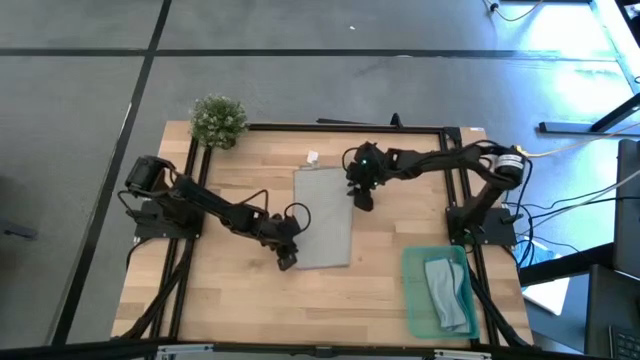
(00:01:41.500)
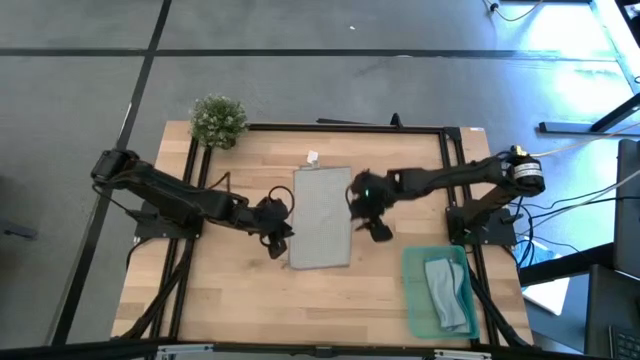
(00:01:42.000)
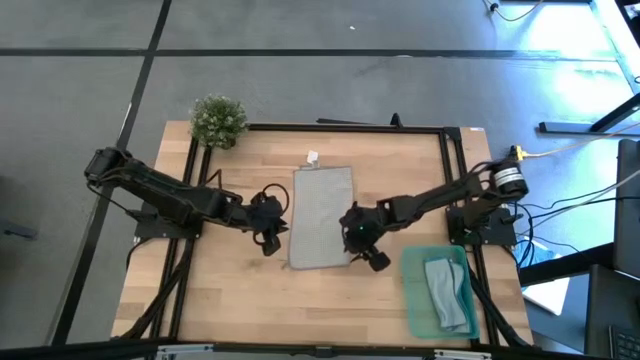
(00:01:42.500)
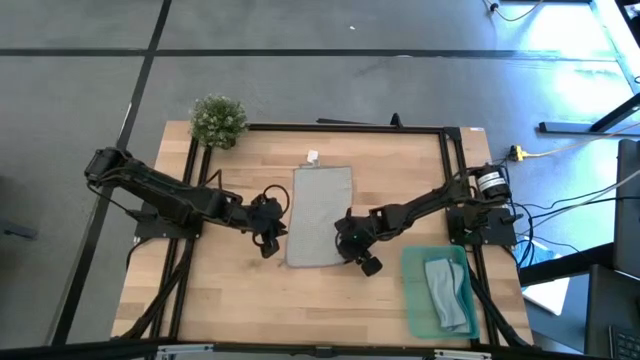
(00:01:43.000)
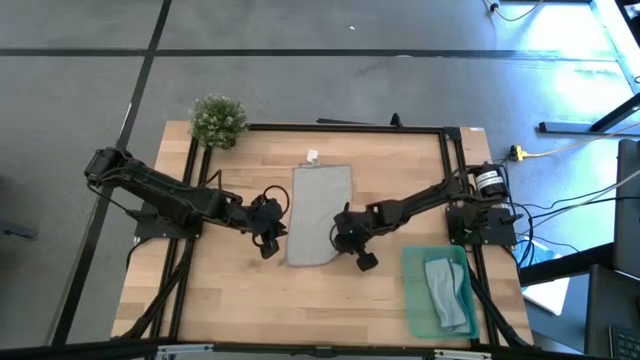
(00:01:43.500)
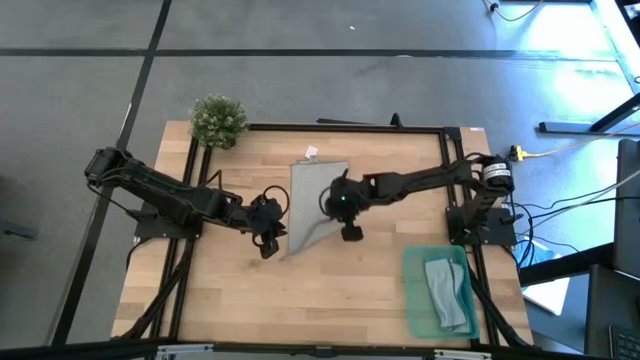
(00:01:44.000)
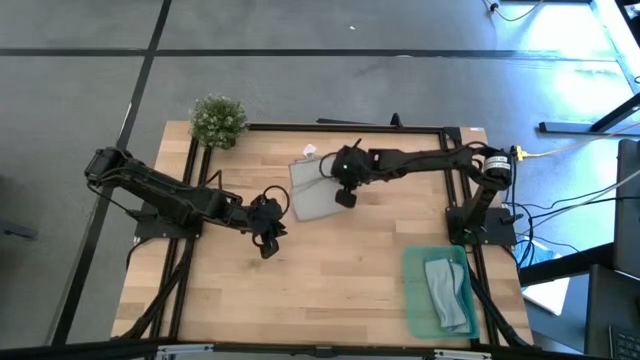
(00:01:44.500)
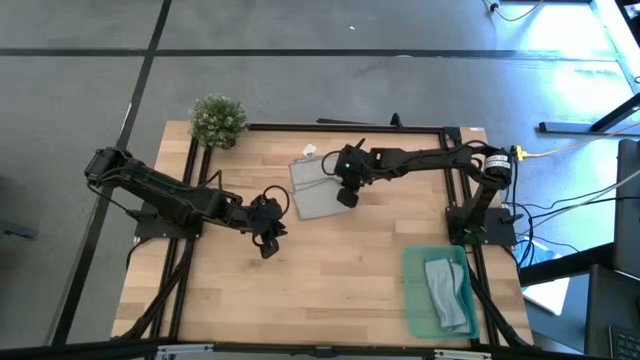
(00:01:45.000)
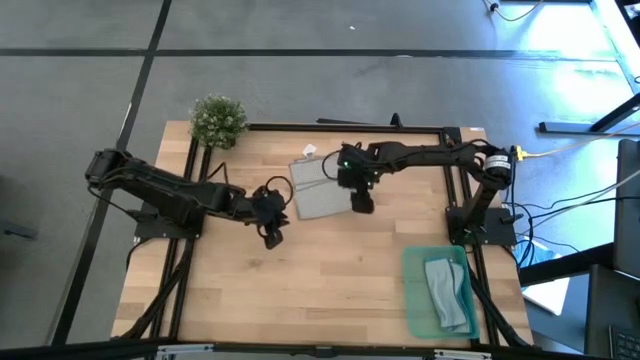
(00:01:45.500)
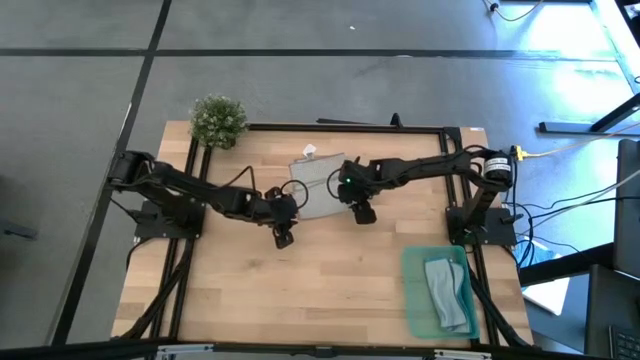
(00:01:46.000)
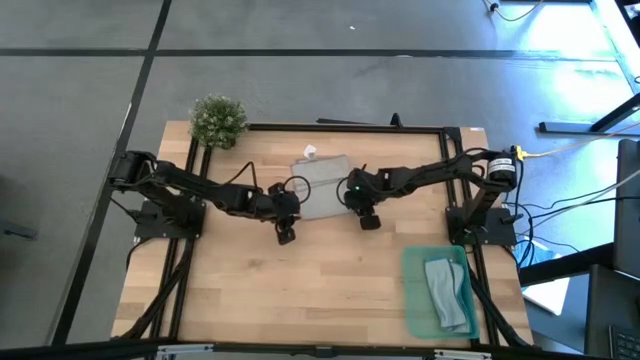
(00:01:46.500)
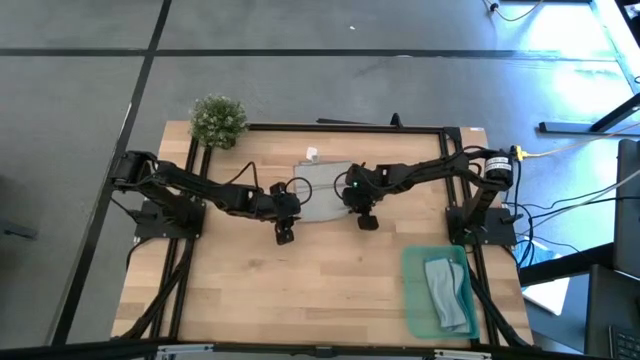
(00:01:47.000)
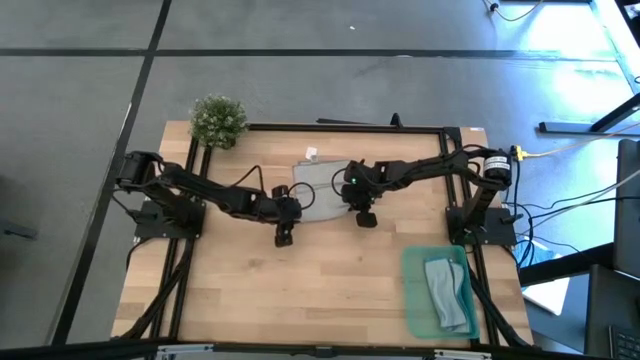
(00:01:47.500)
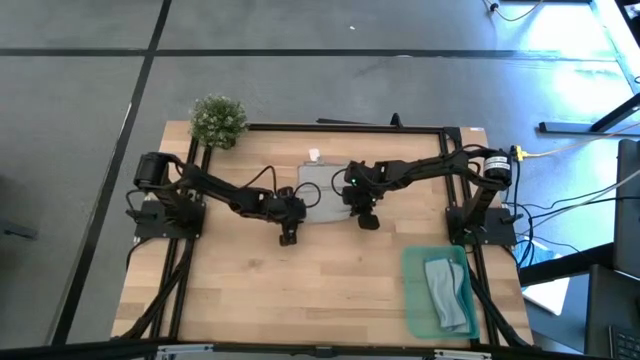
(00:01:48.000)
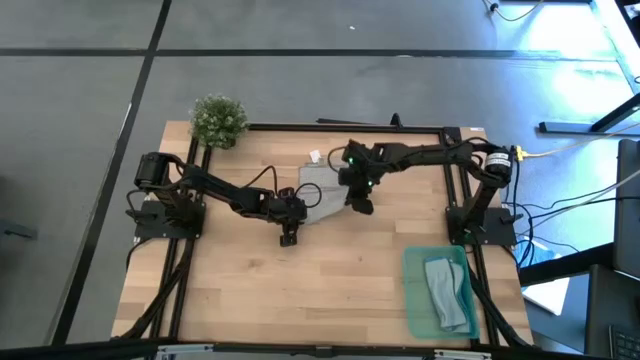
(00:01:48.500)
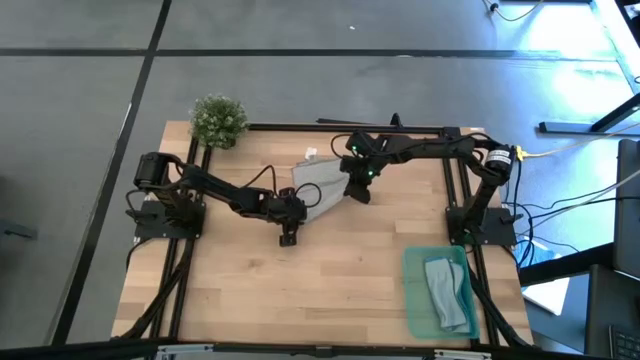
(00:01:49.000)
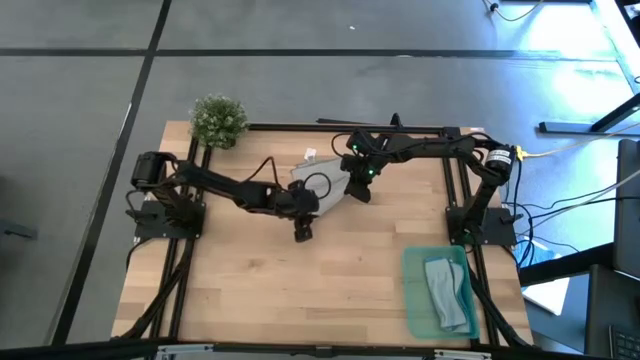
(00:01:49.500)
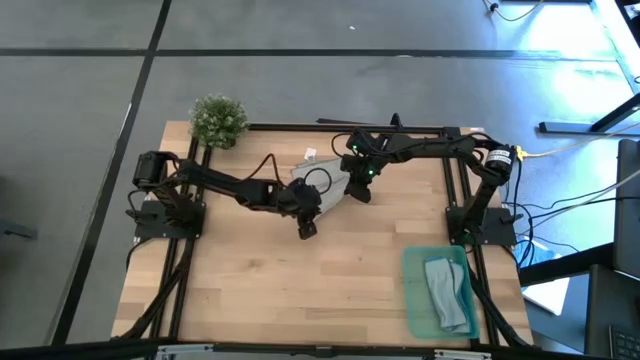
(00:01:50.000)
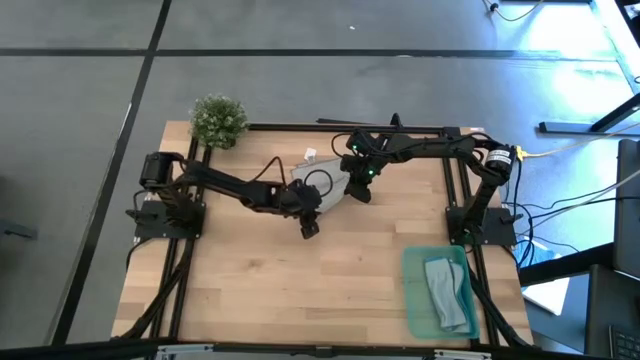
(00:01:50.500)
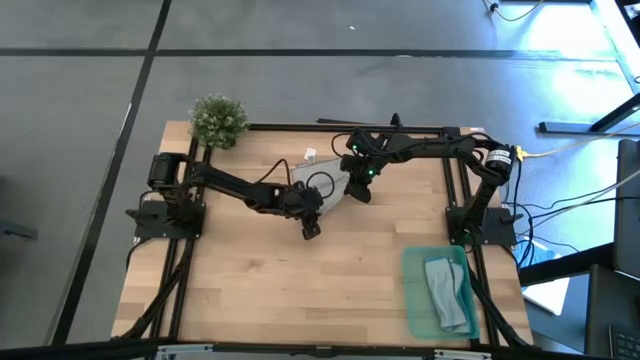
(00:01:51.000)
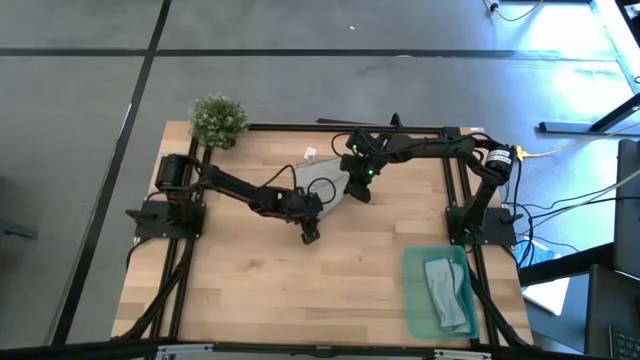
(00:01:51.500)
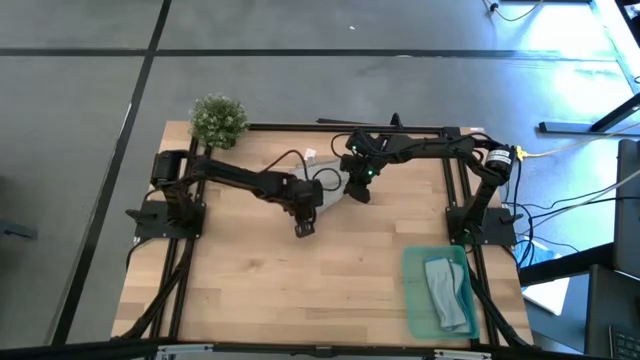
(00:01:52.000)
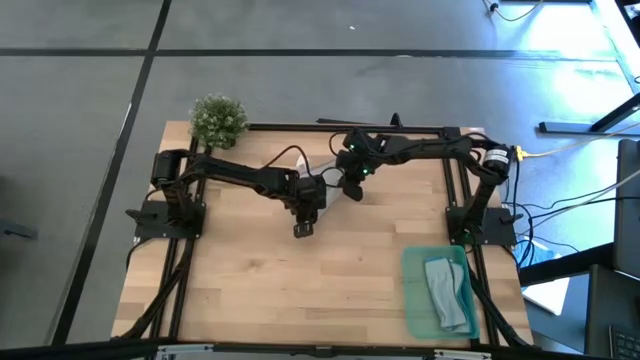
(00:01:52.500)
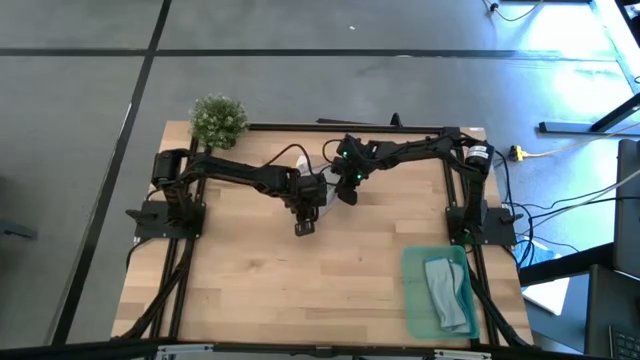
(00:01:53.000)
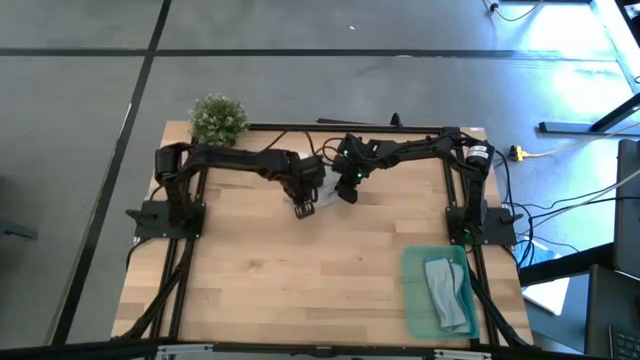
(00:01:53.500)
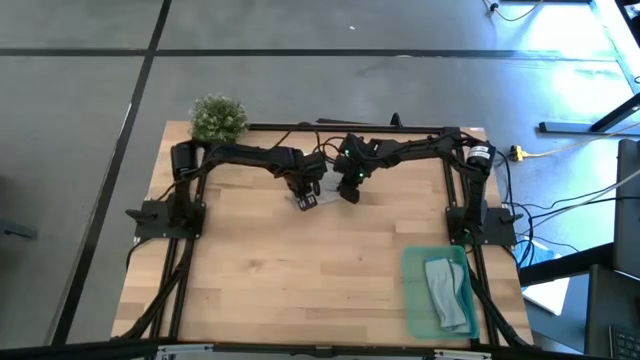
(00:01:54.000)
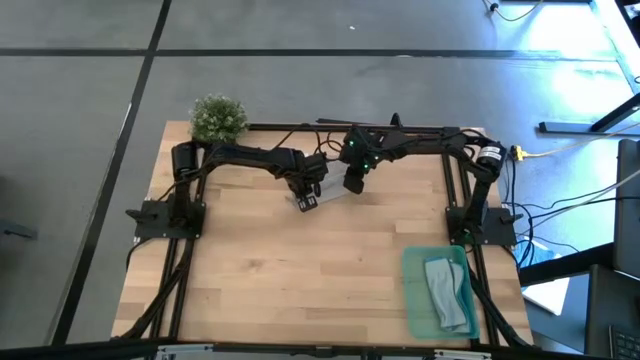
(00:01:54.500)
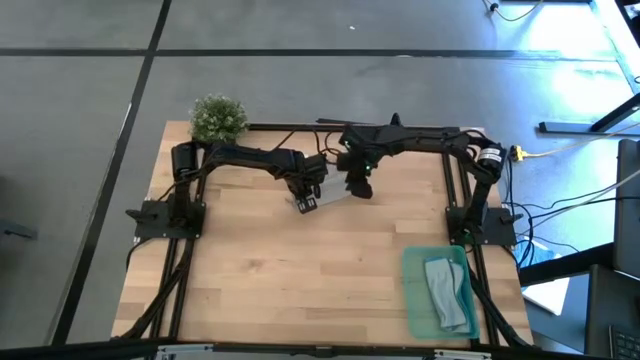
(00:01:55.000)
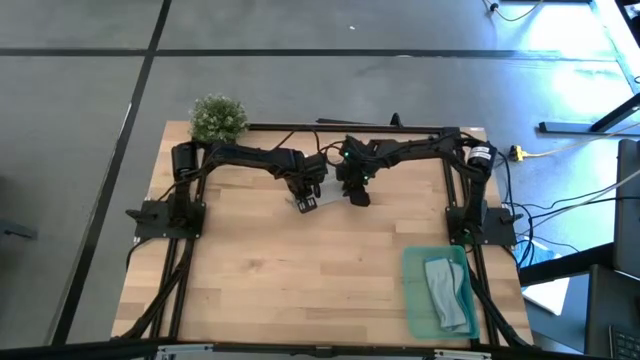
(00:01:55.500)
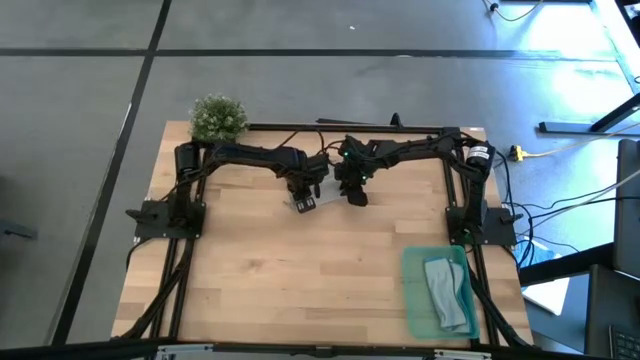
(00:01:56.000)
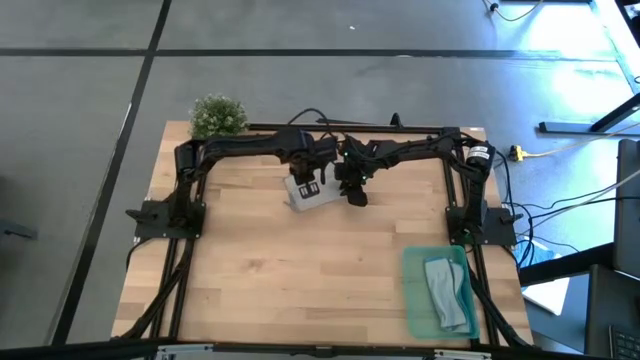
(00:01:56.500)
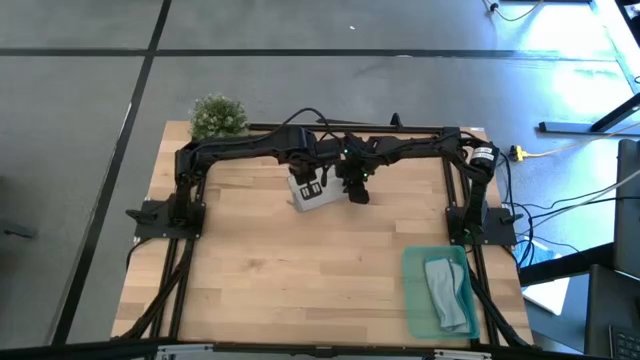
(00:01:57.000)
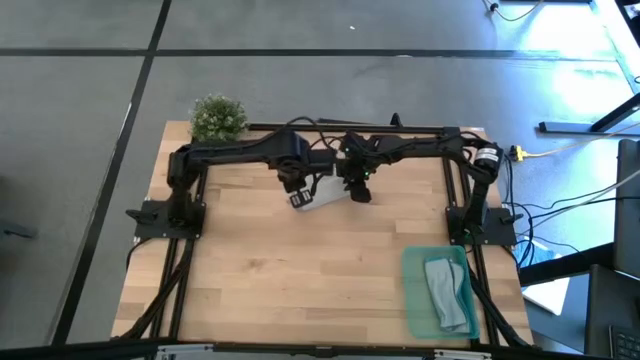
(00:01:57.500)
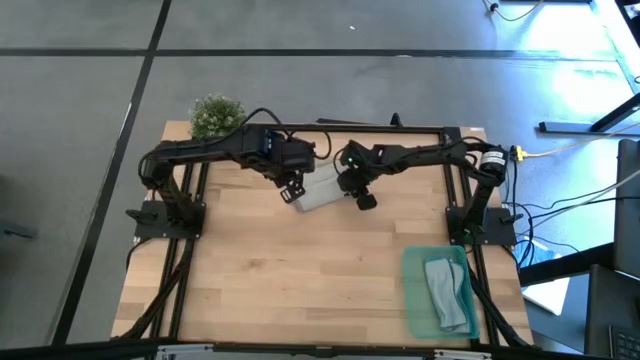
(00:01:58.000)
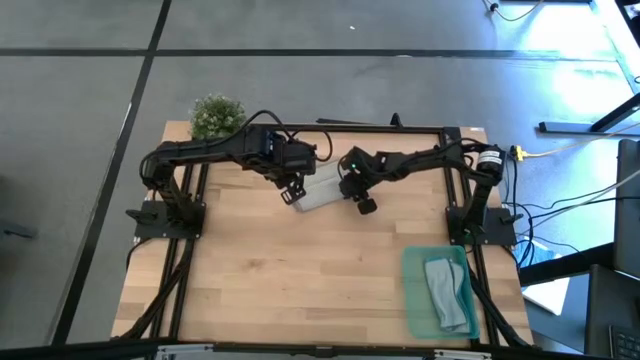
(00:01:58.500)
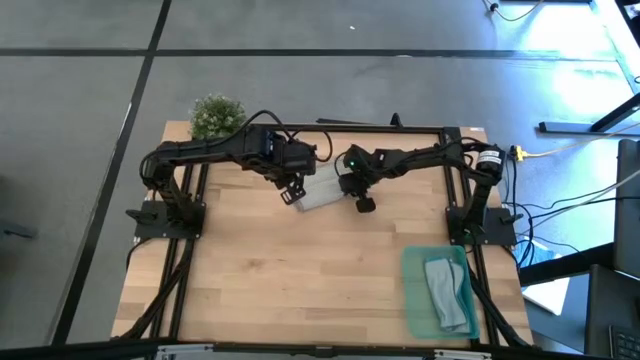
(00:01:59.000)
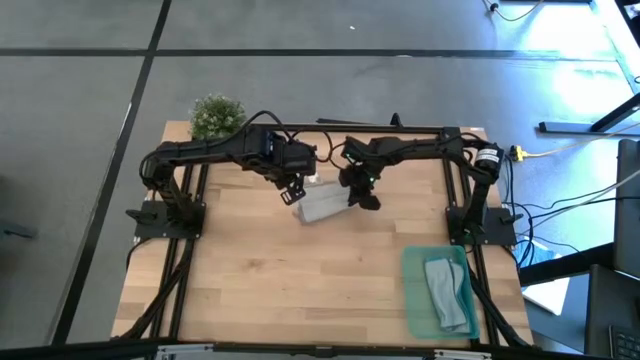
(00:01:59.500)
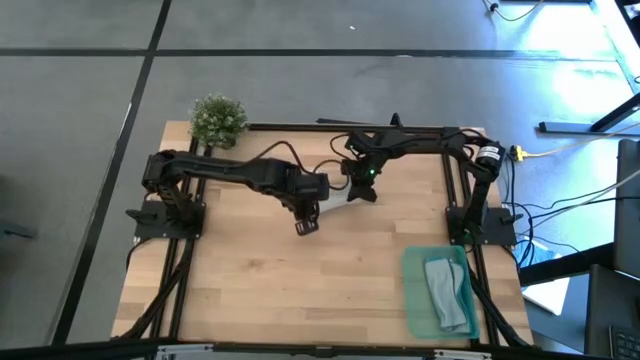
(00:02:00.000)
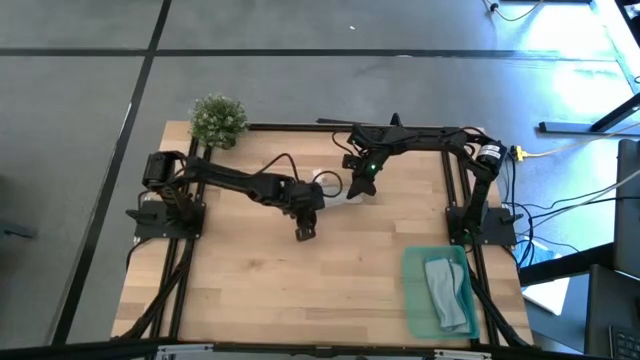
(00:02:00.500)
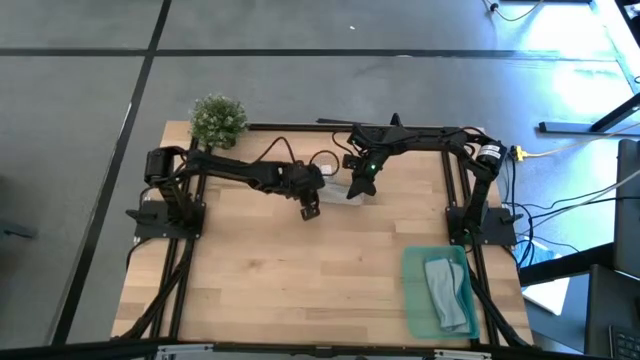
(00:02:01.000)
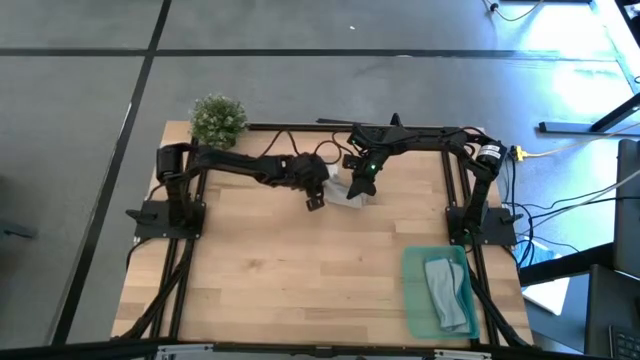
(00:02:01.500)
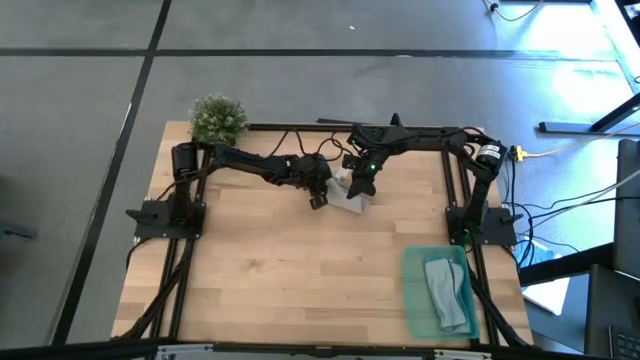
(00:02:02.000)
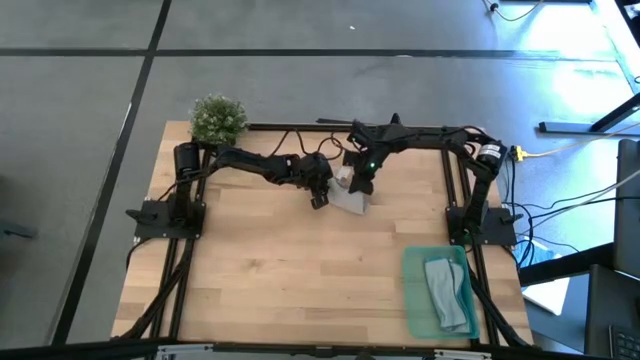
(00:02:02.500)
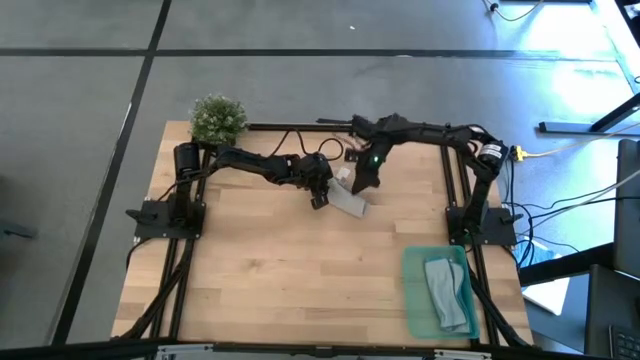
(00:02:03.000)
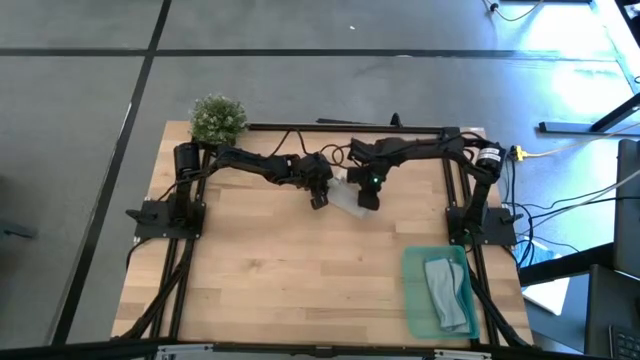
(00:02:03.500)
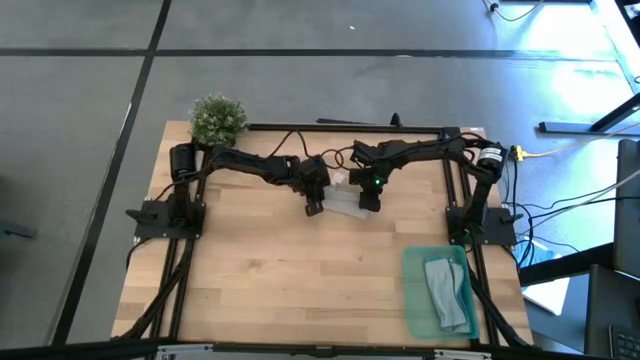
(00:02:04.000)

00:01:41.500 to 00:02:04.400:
Task: Roll microfiber towels into tight, uniform cylinder then place into a basket
Roll the gray towel
